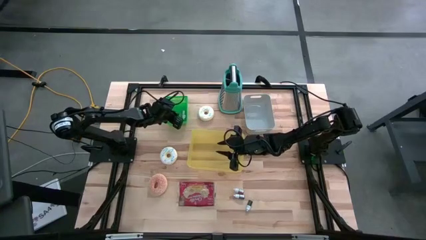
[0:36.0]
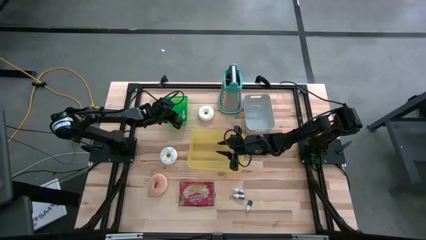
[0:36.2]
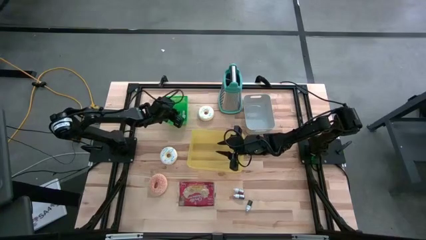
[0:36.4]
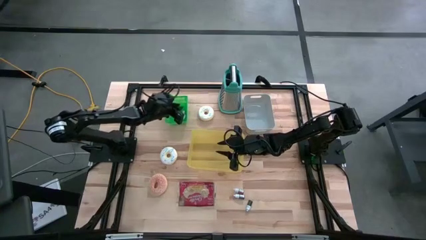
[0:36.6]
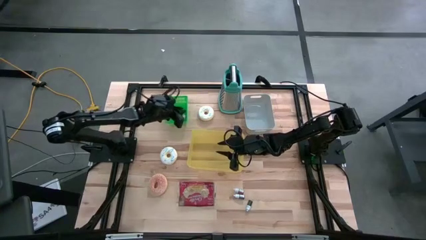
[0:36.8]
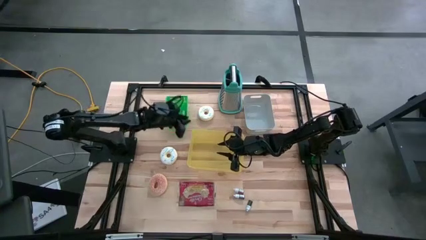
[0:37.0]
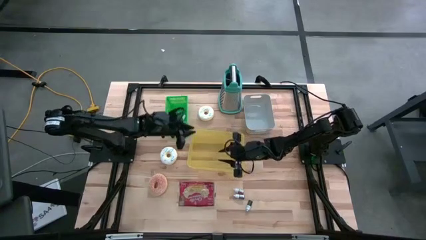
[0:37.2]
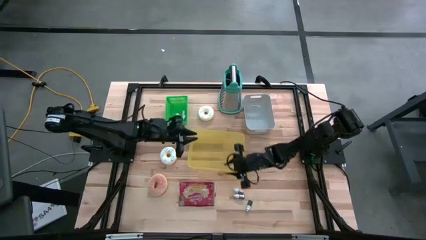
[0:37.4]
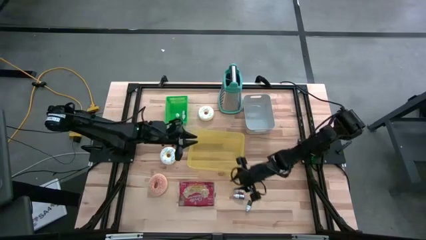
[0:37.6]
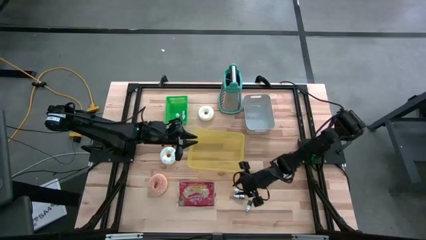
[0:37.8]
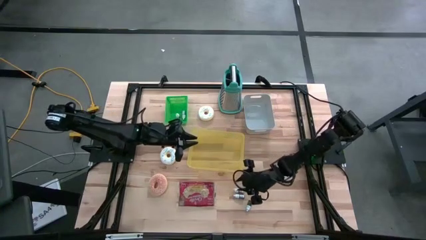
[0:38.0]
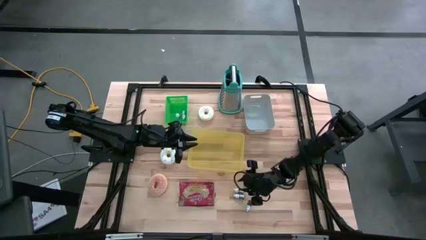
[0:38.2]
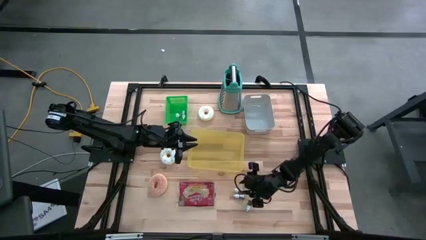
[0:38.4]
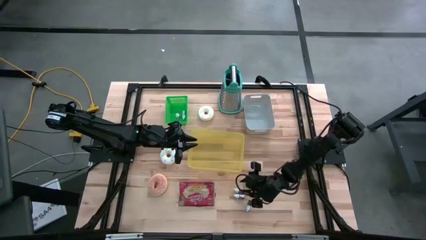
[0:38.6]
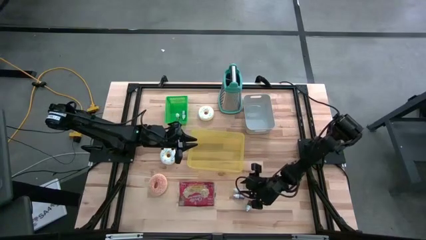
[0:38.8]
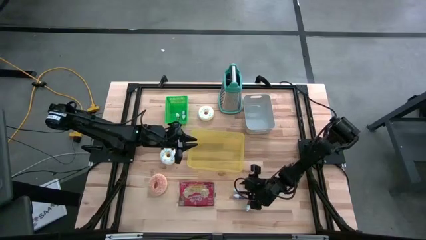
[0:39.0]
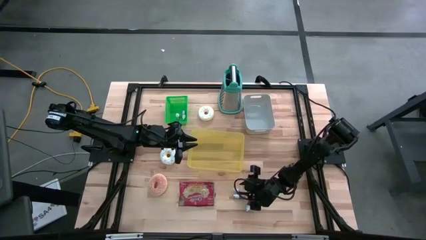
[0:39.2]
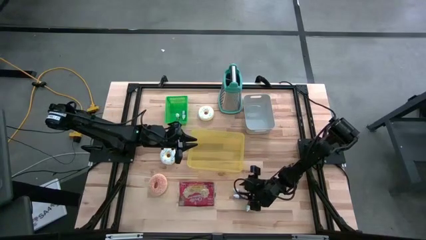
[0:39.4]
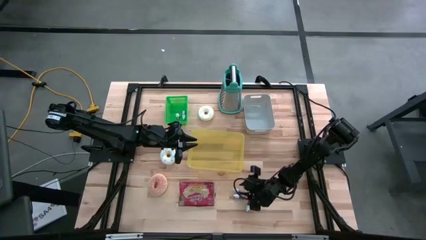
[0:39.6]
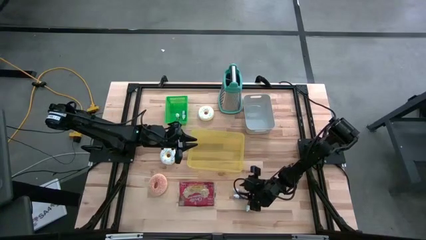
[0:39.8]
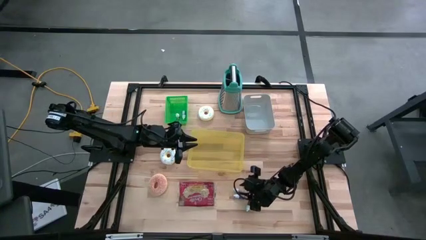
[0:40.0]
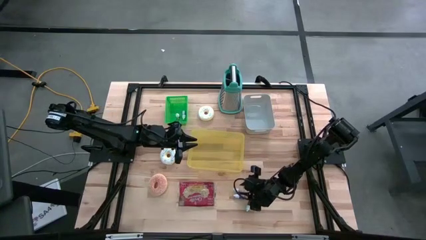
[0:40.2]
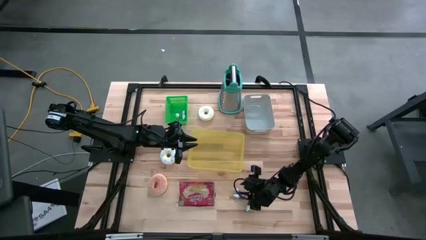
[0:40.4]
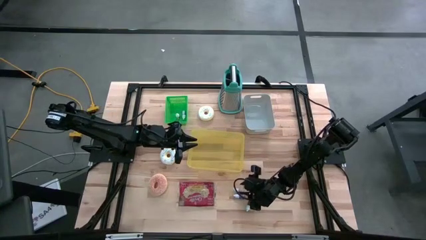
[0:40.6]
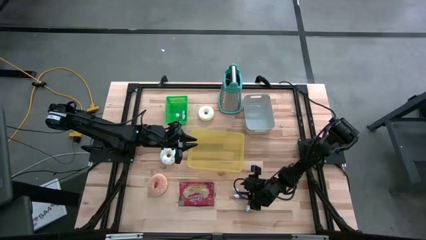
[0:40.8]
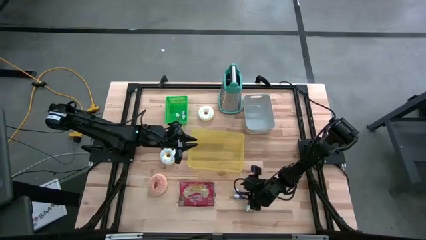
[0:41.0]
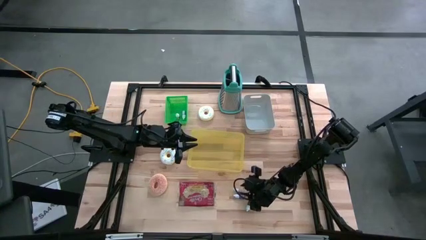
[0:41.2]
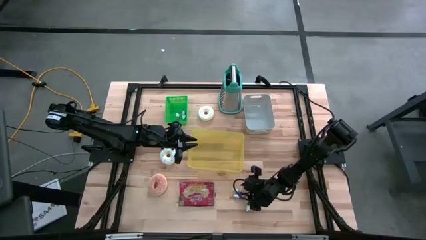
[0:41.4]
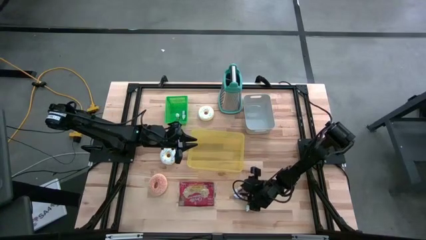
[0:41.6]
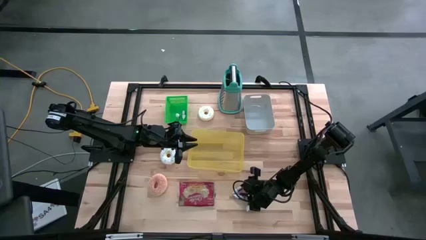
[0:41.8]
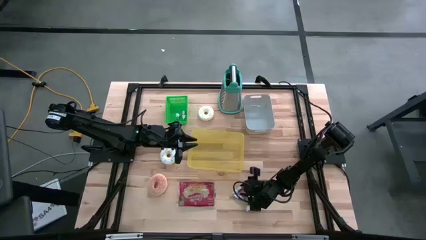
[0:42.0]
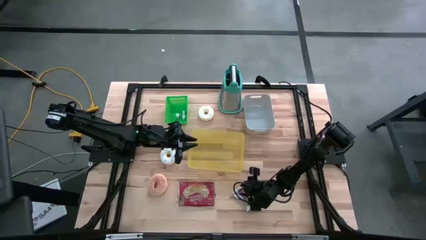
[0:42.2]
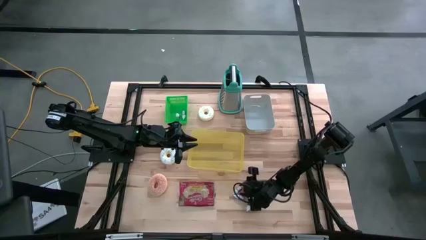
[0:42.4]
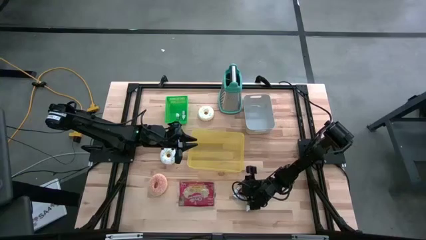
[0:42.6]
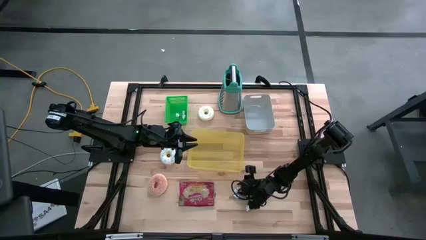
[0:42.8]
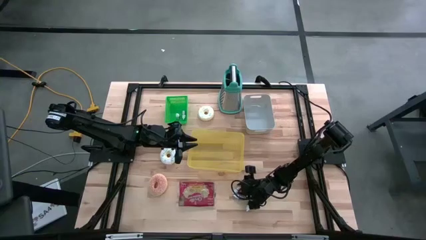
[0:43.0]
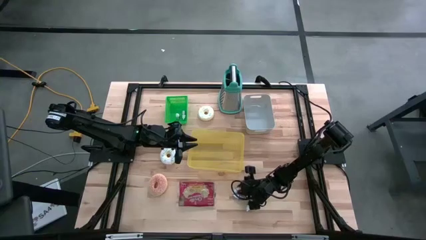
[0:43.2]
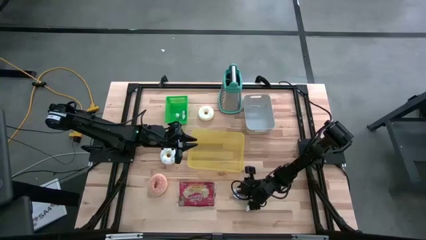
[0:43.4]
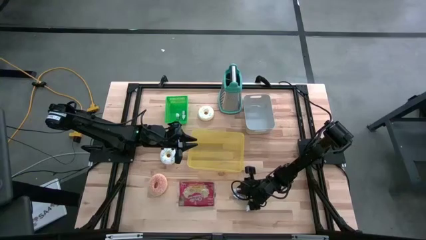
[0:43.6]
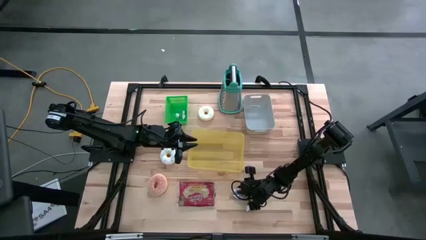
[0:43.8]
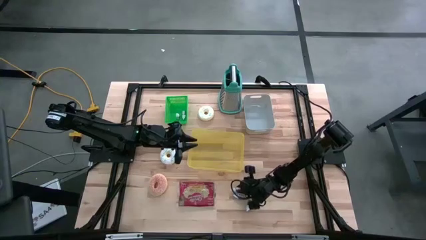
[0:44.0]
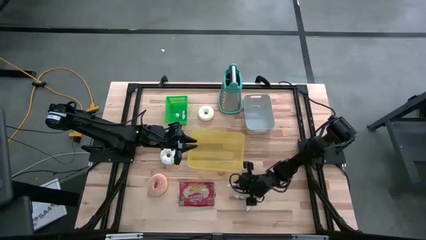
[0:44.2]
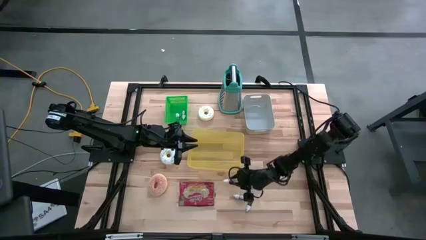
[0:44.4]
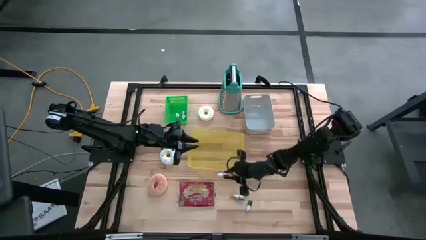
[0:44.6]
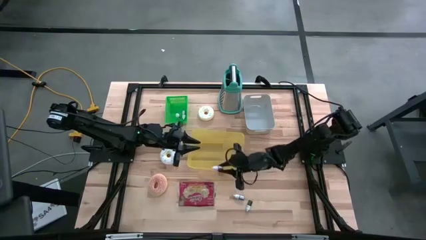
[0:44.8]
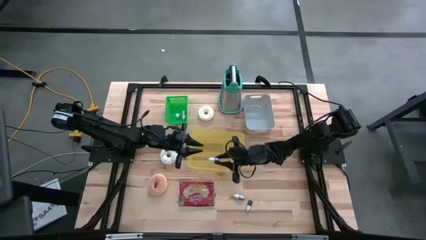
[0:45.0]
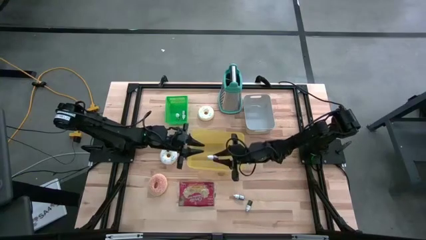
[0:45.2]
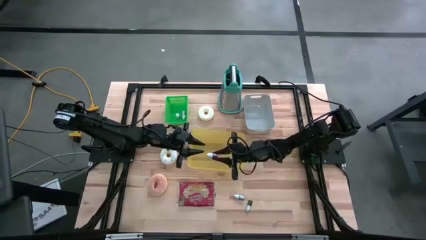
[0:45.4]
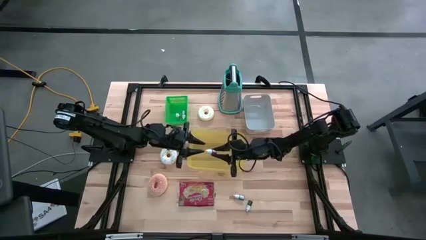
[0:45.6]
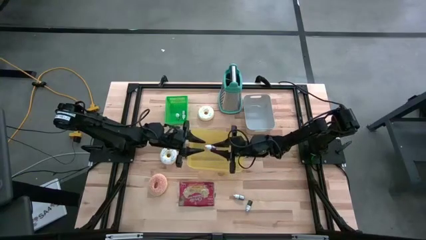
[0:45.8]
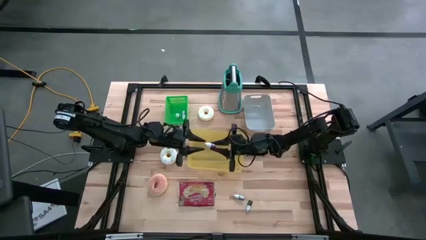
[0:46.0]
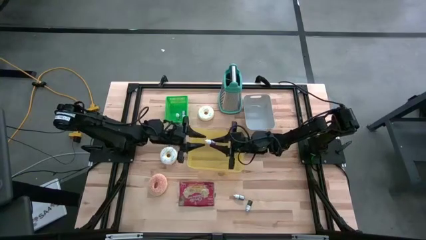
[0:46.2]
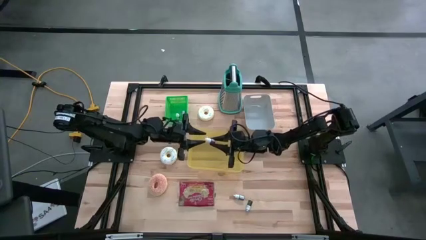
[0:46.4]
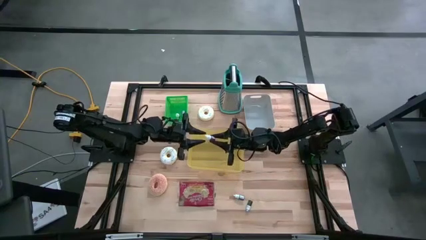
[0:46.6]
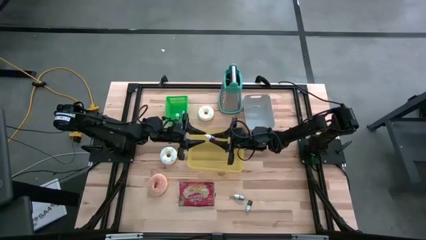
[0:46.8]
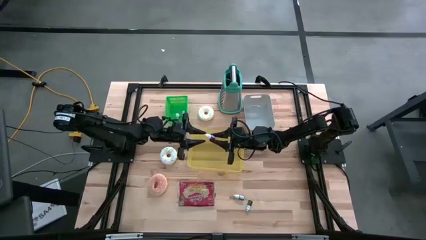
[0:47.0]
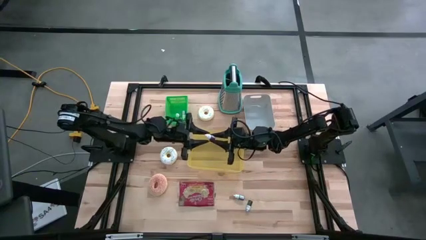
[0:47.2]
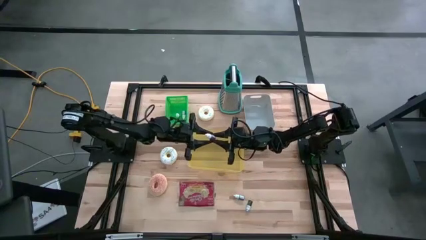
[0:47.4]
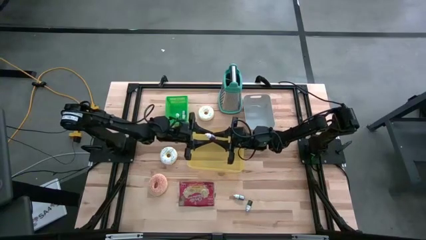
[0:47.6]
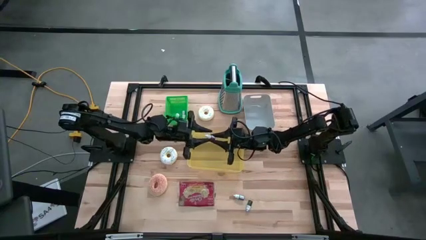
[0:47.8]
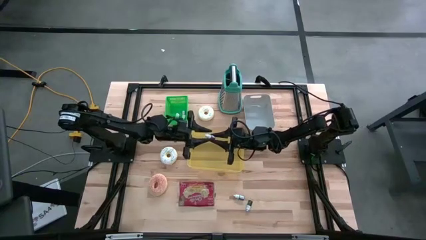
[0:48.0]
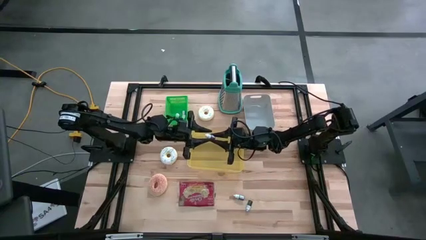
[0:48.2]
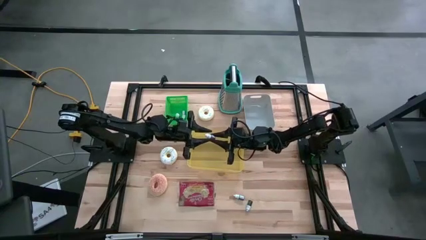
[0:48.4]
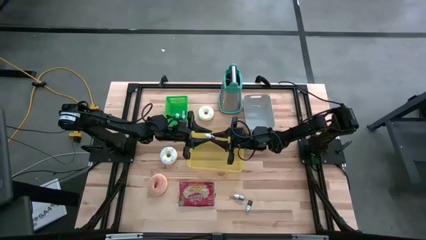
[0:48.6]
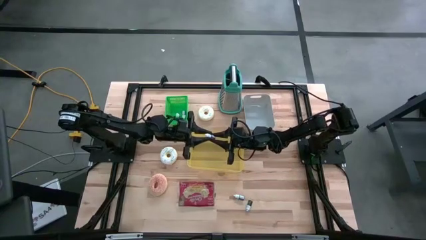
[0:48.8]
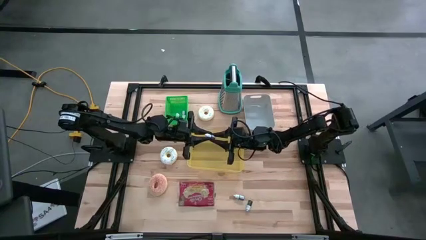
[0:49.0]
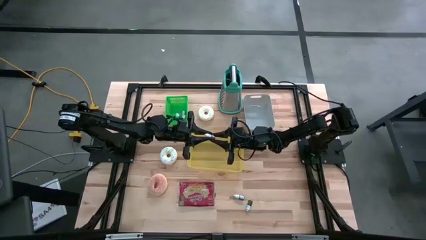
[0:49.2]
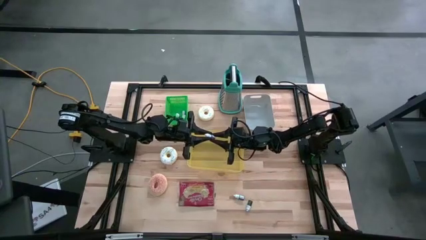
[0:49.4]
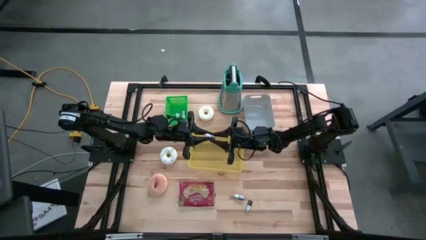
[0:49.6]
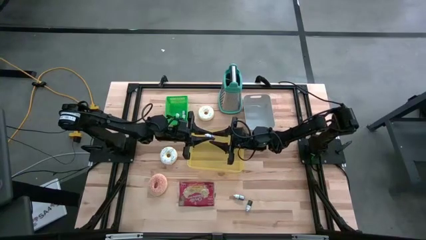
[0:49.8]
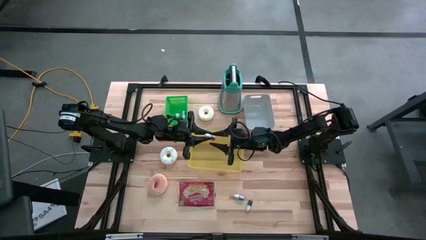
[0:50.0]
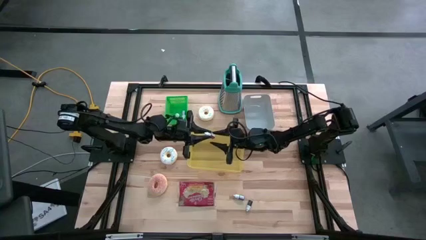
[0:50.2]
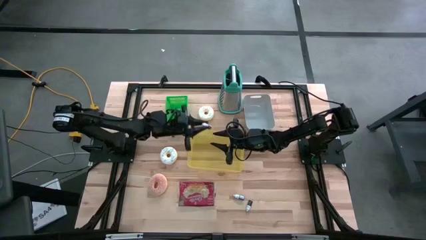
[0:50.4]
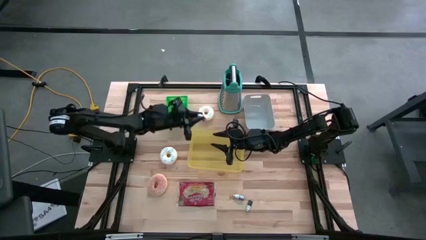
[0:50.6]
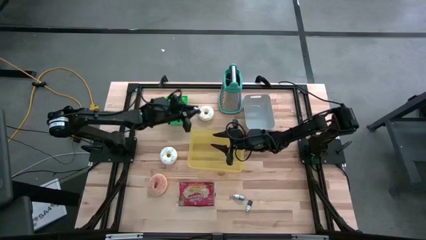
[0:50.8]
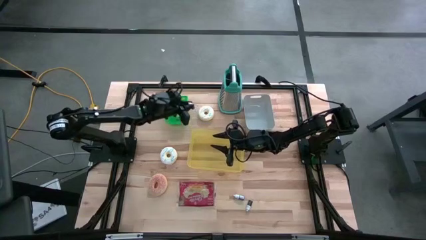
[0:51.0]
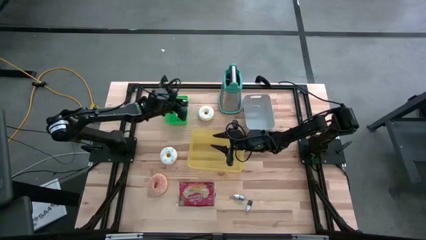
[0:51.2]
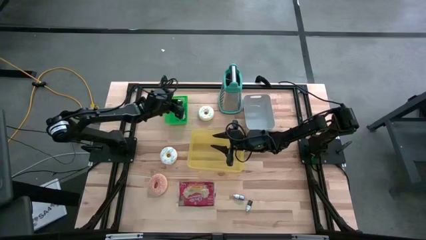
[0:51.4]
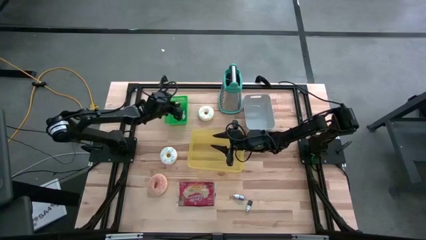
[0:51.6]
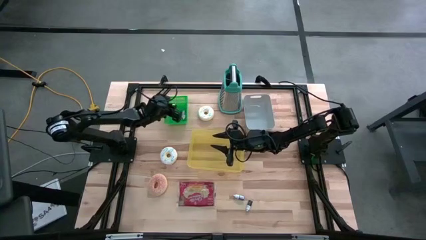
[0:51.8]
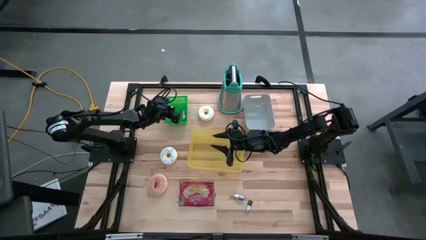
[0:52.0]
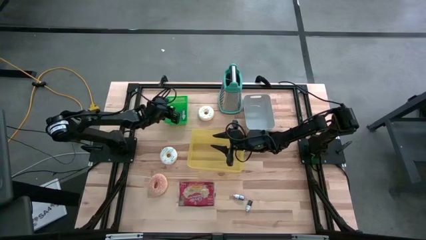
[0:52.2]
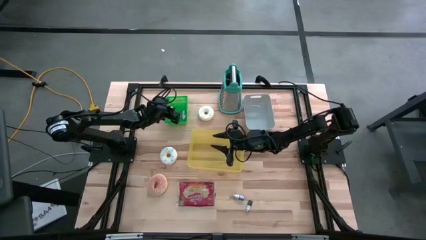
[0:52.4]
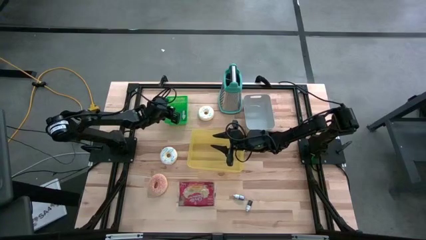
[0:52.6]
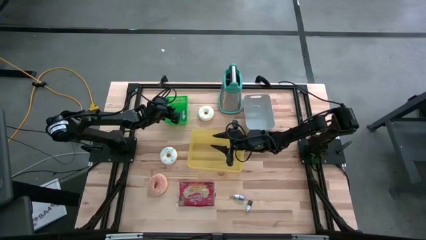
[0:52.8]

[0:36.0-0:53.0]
Put the red food coloring bottle into the green bin
